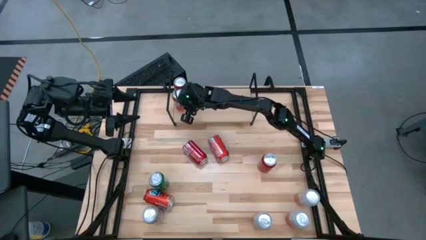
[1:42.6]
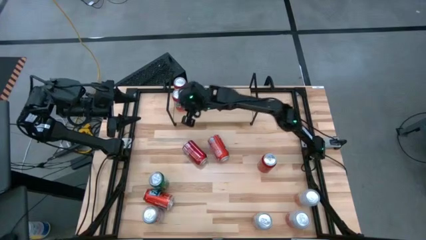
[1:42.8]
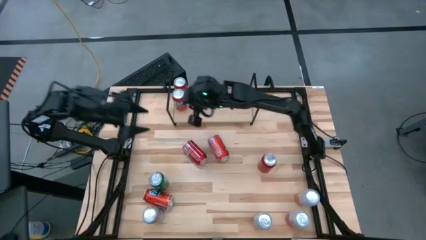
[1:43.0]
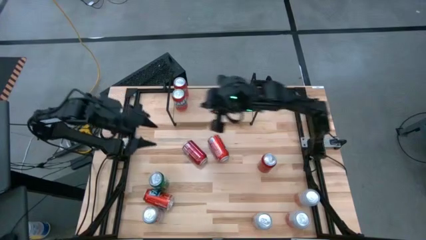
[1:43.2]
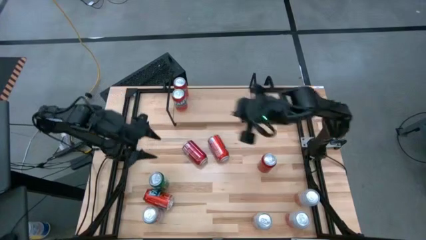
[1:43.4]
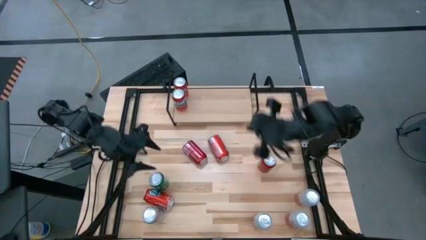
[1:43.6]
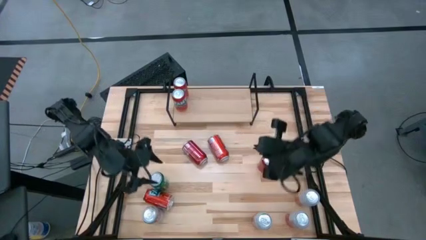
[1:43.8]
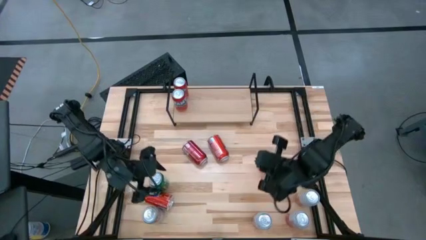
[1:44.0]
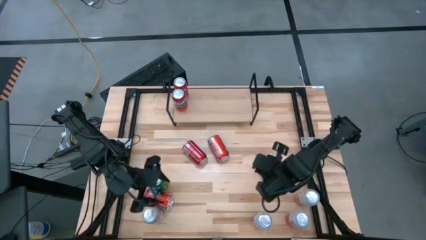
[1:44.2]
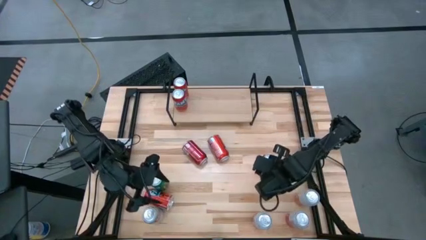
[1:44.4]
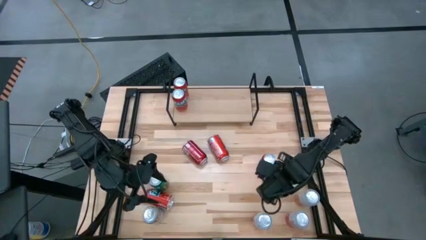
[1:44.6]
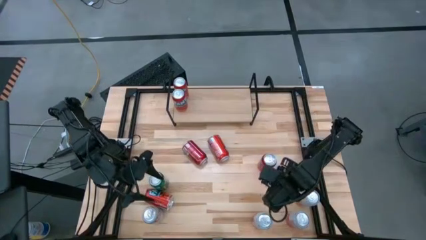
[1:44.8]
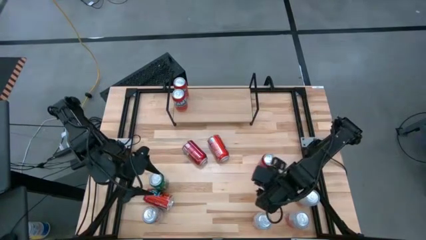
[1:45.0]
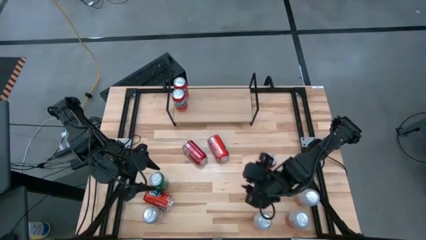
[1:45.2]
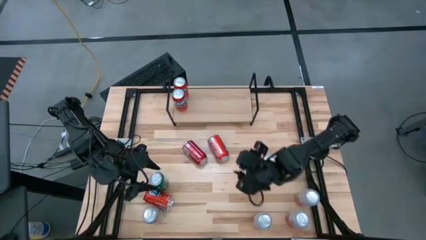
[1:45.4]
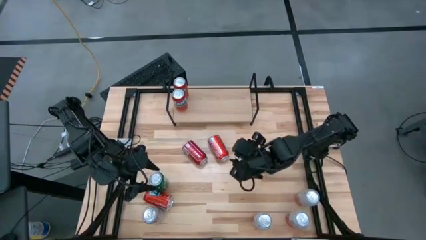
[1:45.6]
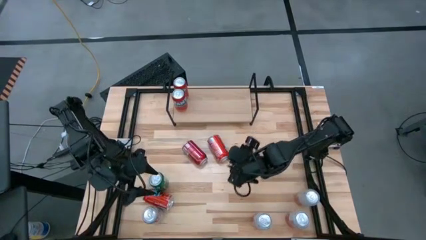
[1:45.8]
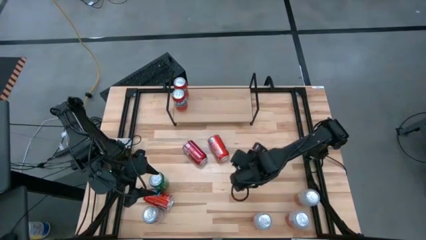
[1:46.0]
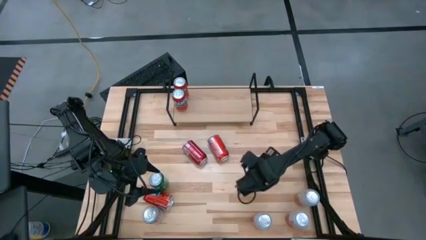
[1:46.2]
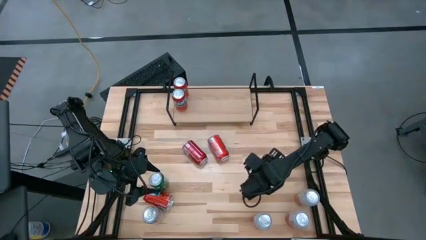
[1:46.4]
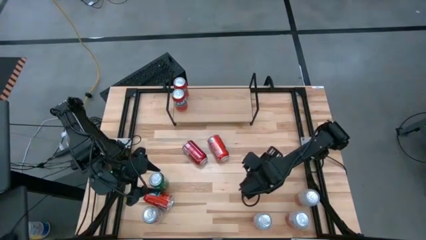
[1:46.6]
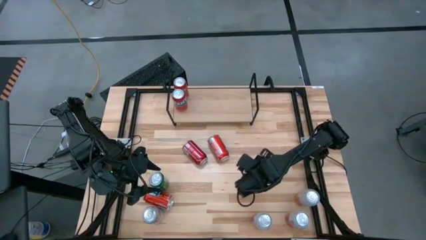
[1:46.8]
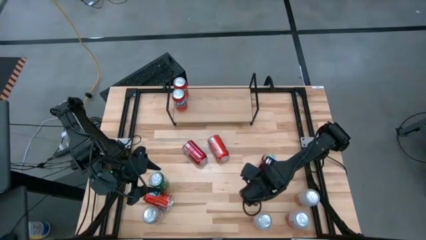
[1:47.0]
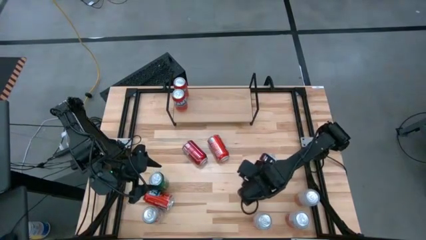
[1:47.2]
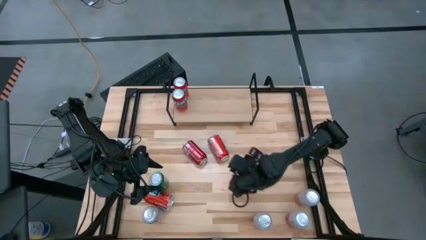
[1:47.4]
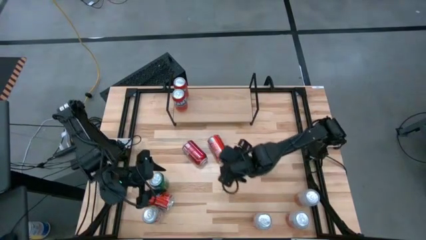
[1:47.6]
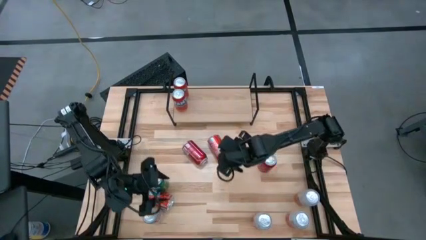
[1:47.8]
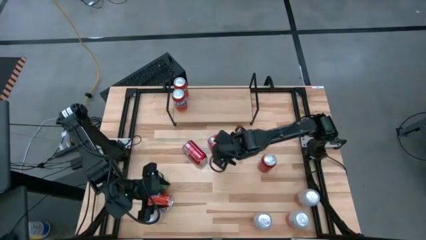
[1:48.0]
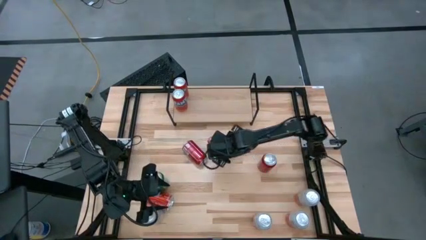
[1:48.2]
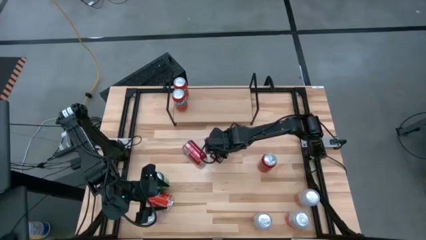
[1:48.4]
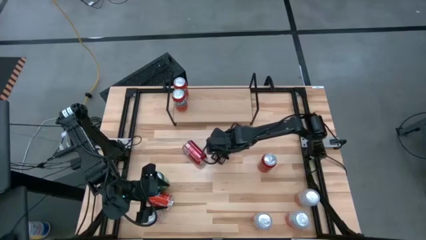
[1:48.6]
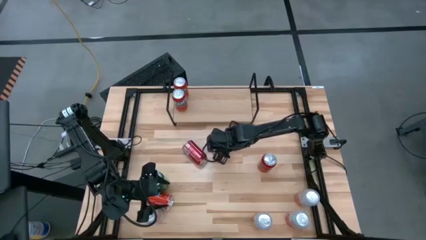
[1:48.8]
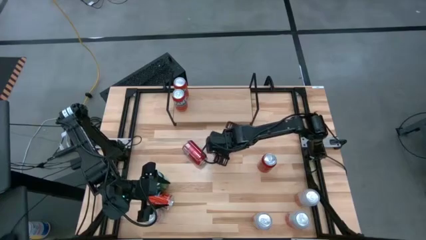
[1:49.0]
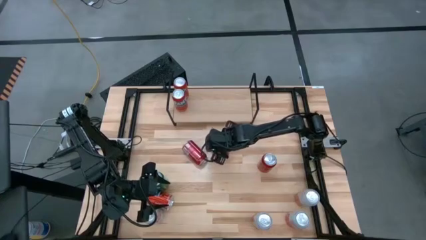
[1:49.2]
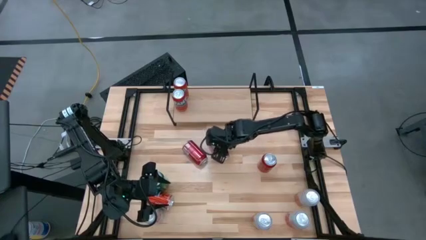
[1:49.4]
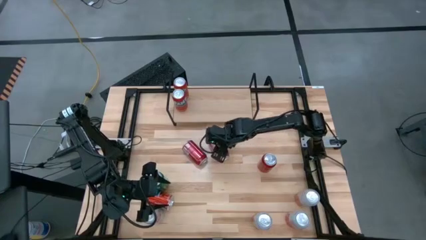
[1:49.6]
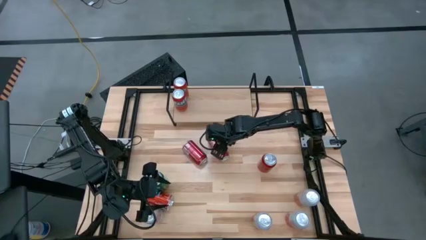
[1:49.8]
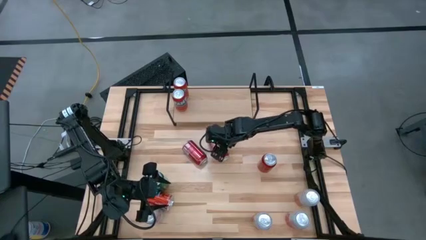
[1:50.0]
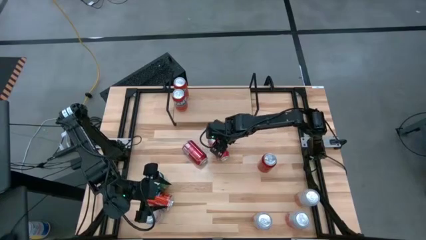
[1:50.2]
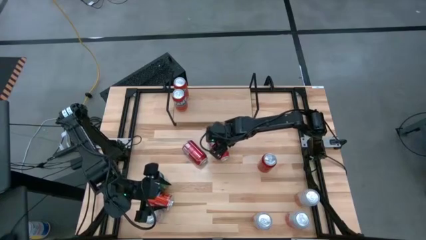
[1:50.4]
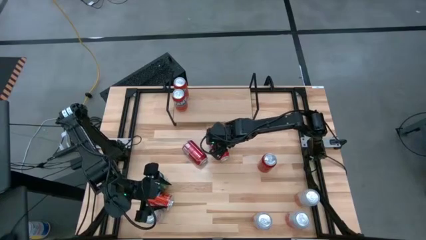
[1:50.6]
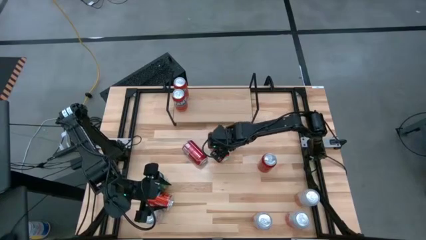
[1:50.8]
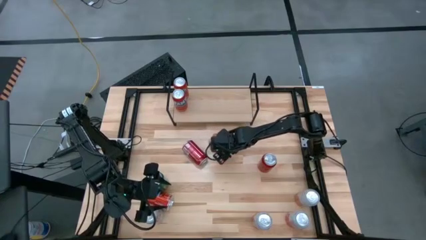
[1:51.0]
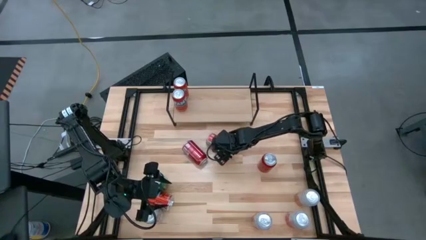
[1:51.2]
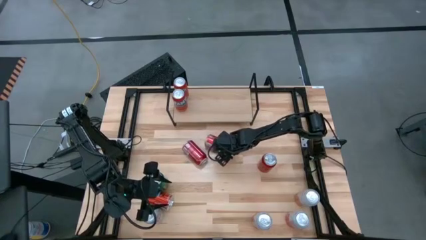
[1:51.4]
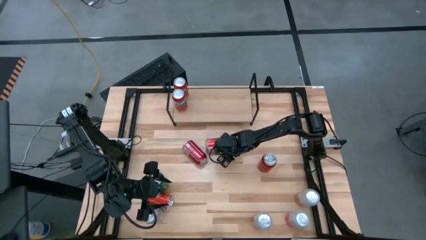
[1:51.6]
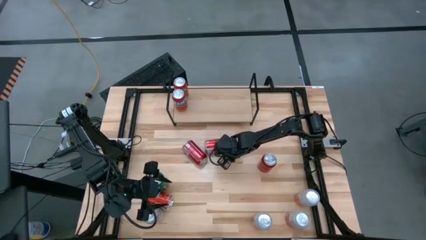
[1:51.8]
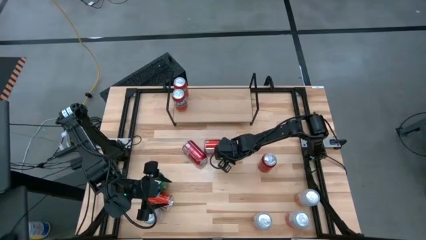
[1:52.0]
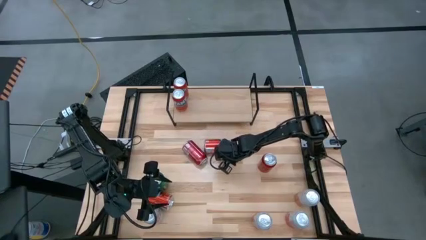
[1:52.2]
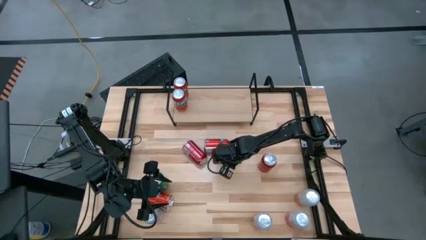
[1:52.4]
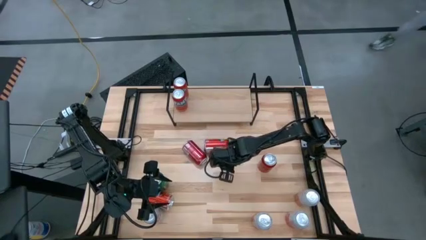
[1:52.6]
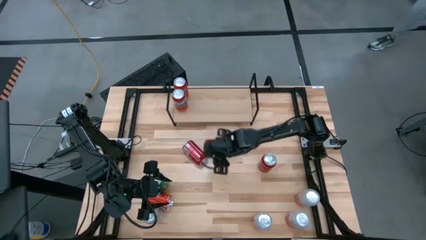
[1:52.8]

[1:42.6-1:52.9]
Task: Place canned beverage on shelf
Put the red soda can on the shelf and align with the other red soda cans

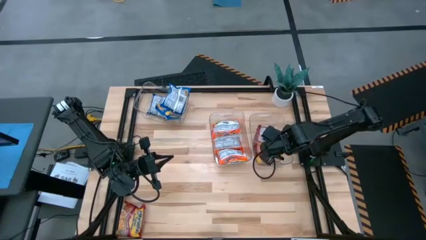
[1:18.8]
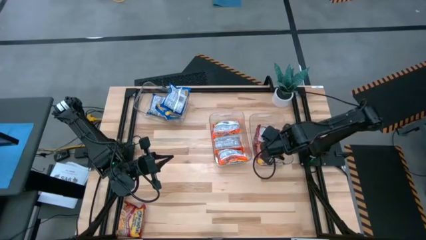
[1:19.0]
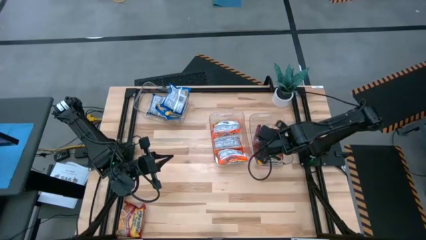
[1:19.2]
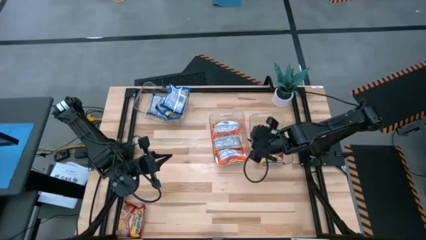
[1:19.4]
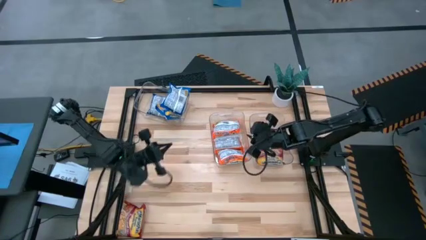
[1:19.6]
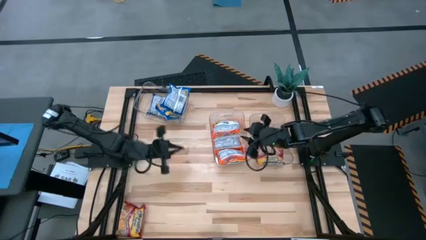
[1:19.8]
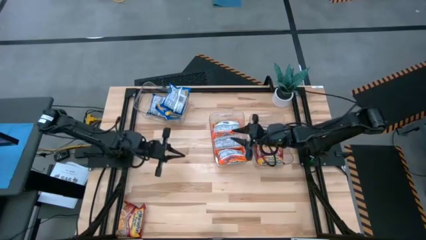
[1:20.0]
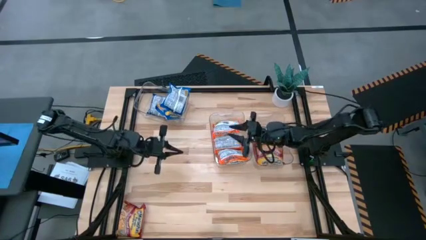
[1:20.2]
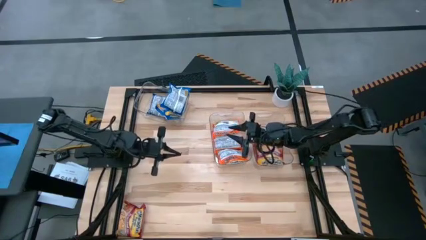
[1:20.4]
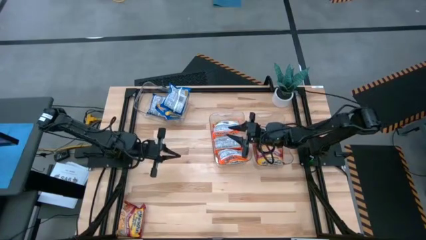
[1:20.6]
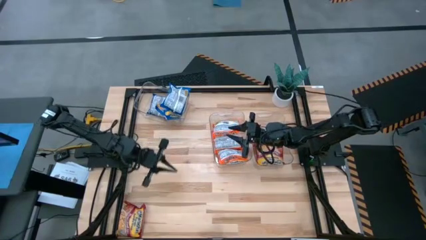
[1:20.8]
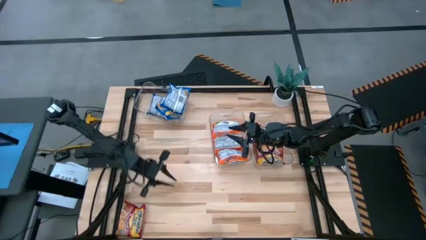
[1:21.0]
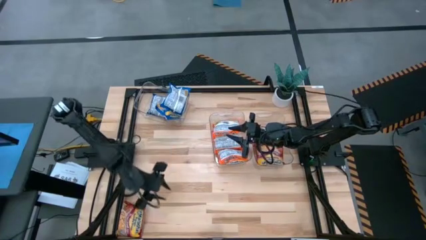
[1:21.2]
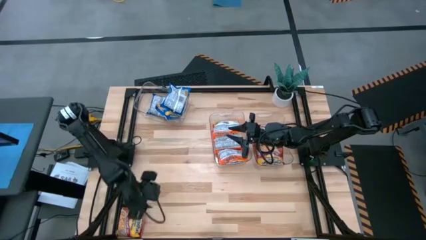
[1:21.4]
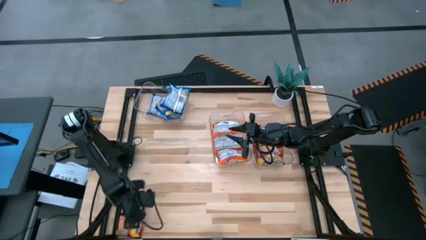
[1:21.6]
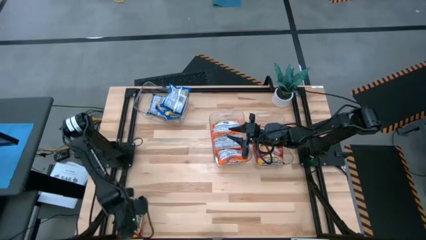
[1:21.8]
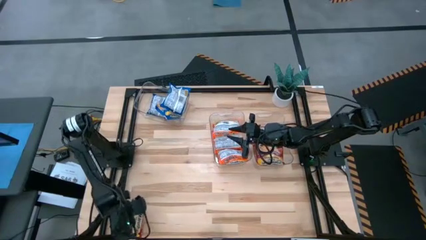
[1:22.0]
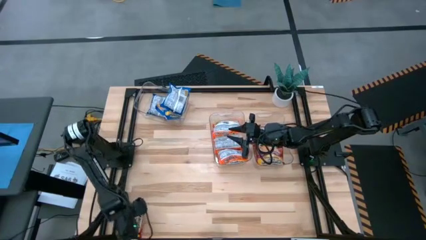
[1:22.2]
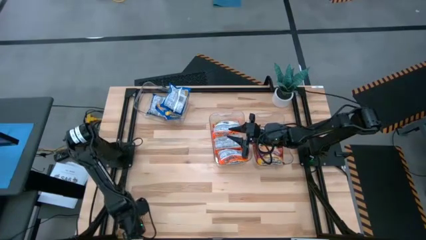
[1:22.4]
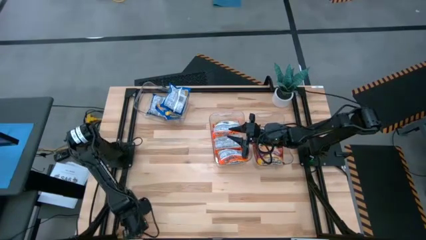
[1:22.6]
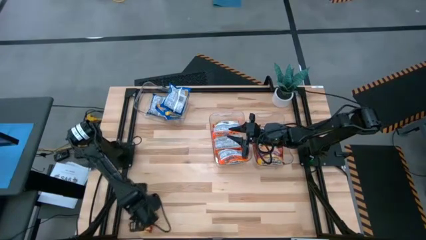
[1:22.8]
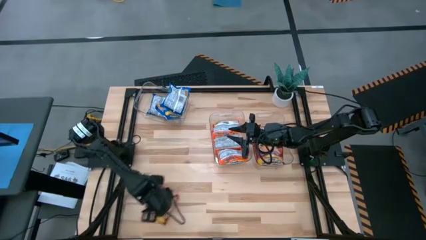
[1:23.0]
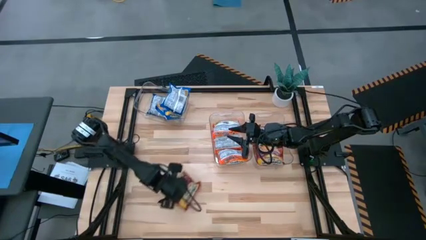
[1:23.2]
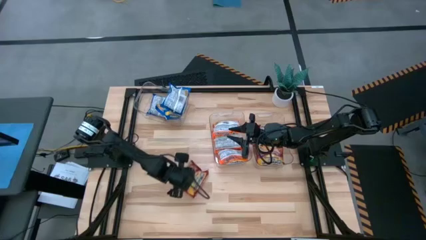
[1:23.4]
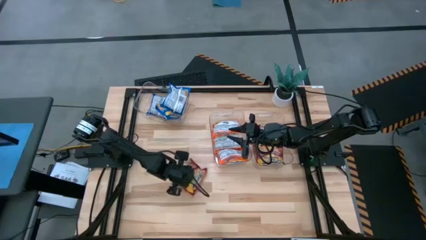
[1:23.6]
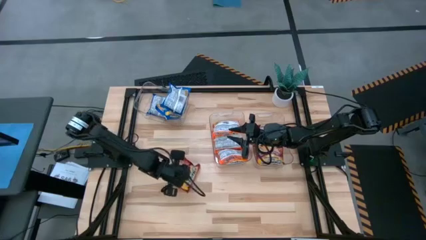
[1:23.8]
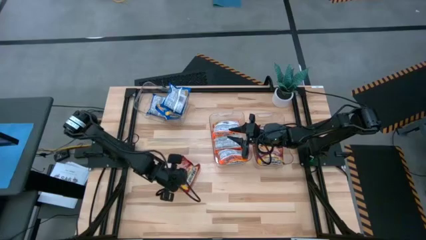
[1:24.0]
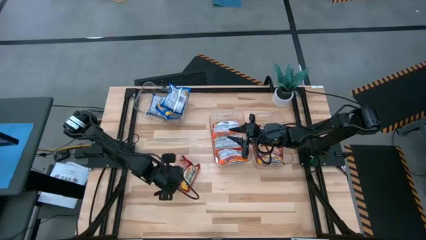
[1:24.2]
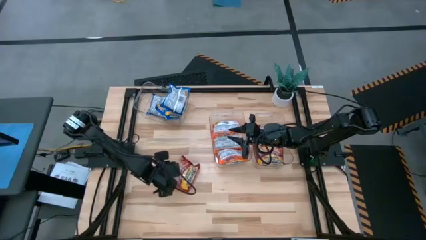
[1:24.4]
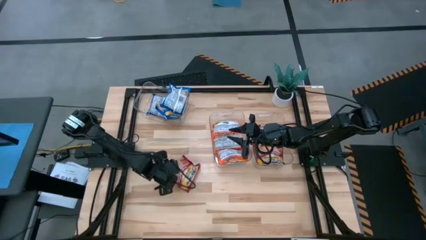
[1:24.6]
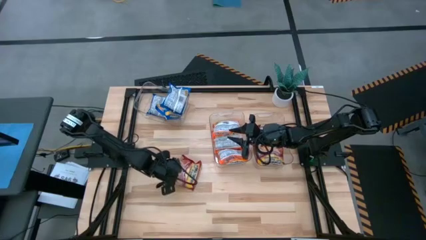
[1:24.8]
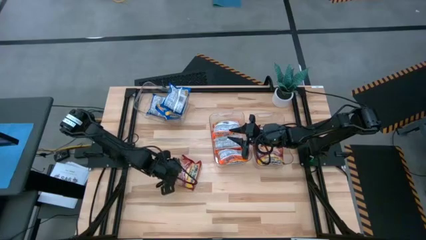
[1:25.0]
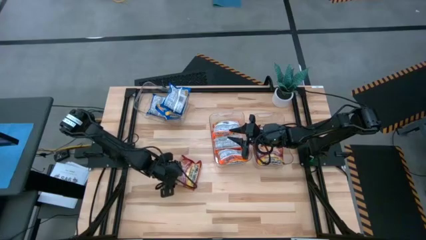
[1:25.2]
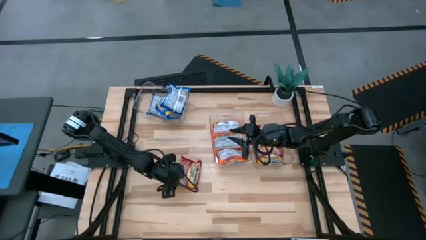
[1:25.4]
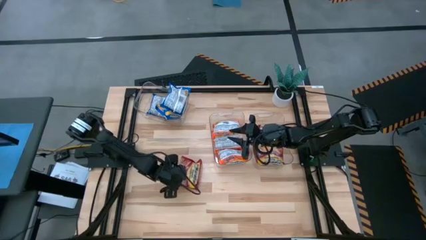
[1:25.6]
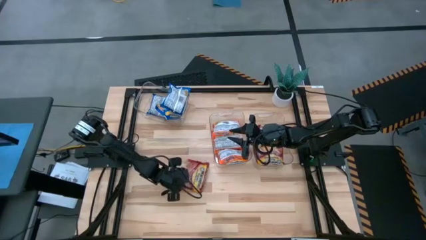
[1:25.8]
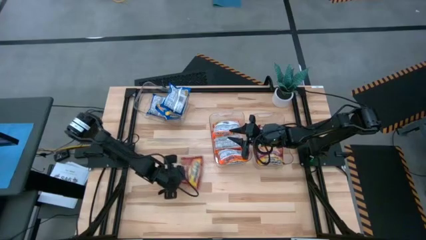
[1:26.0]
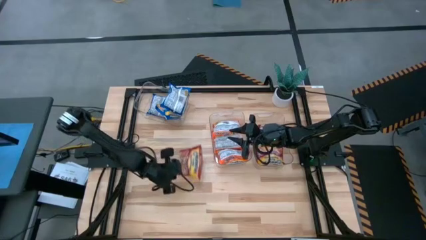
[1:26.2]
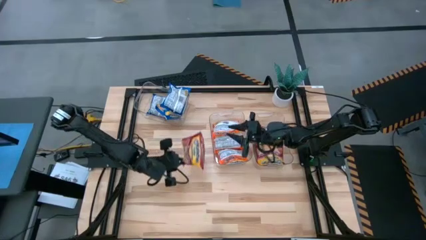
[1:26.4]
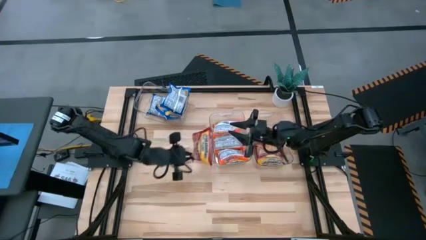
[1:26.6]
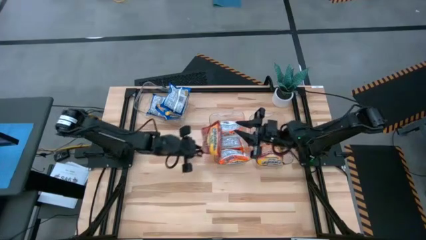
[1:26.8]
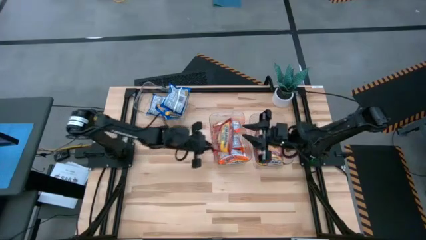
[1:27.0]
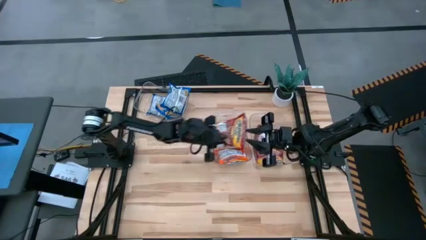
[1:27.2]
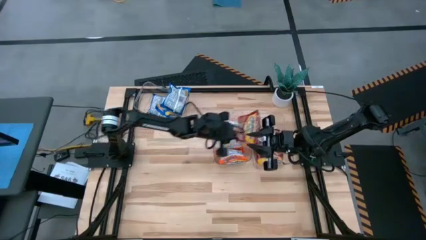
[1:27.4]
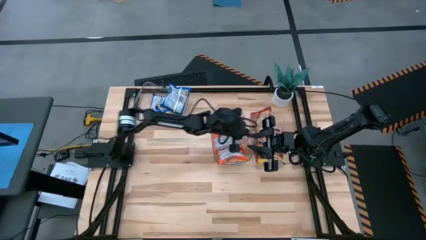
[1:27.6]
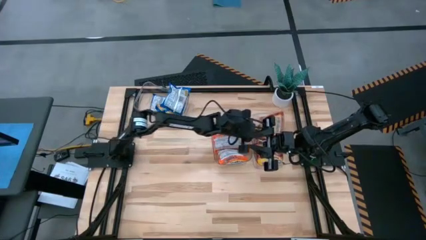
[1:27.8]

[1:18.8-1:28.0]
Task: Sort Maruchan noodles
Put the red noodle pack into the bottom right transparent bin
